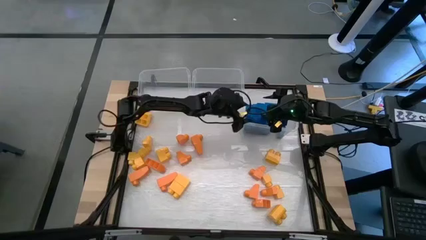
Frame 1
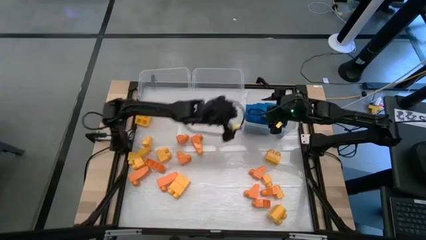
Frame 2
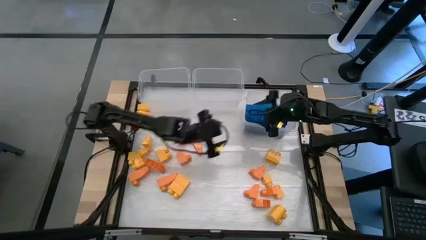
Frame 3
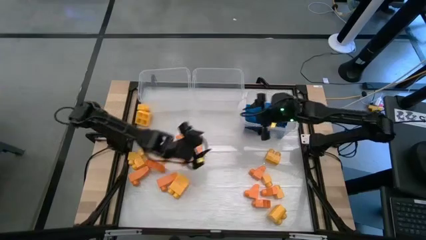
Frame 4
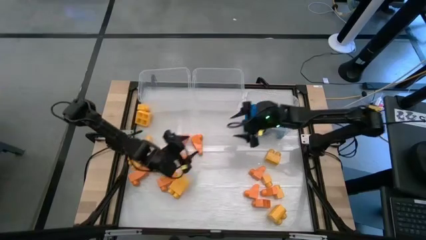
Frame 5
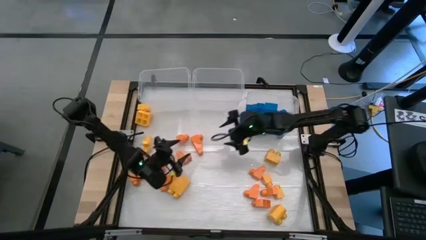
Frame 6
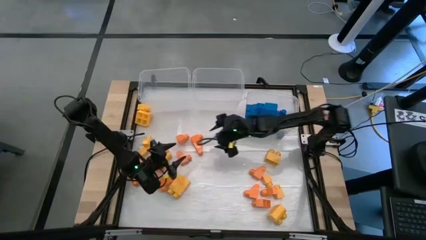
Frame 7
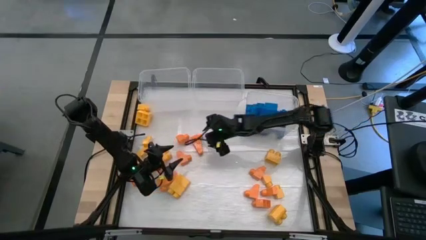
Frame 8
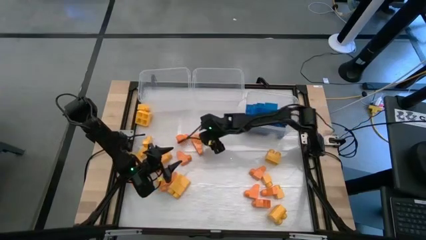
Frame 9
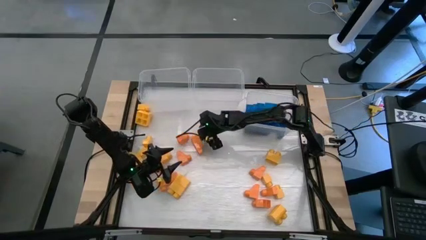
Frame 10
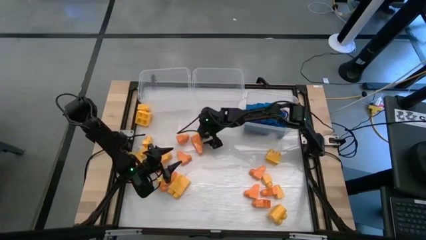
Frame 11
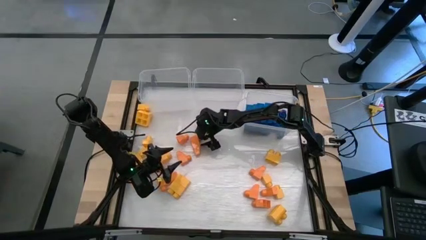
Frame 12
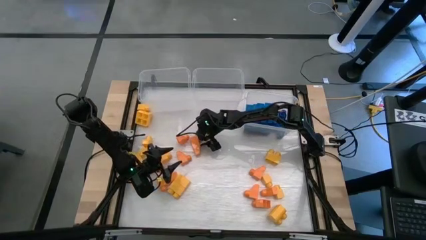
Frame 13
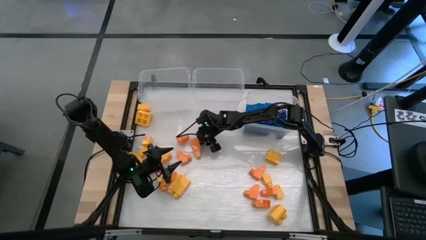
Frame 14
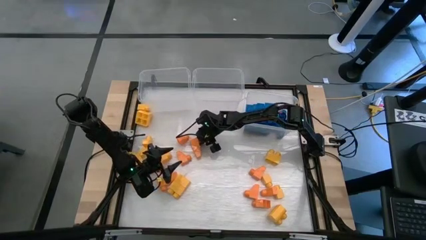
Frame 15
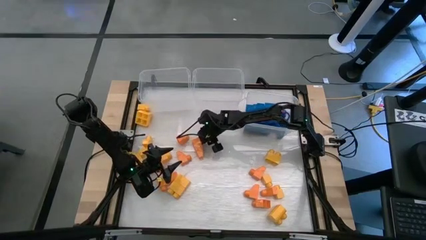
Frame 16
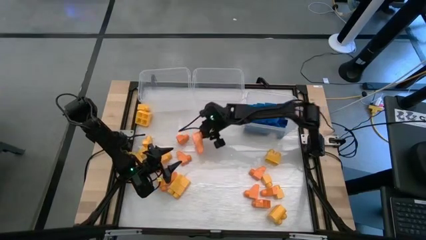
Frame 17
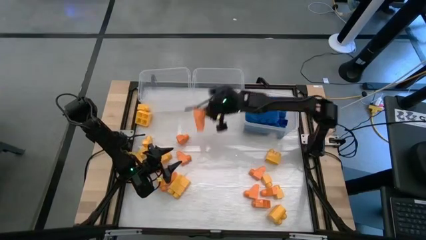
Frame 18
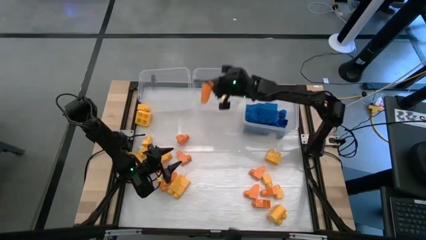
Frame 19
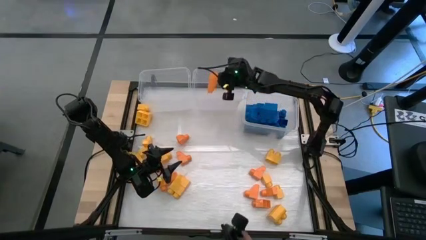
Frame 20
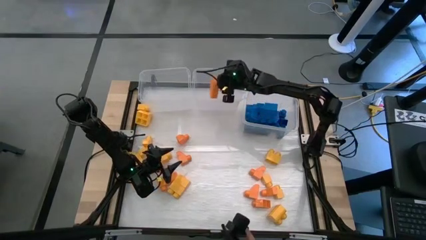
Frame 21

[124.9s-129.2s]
Task: Sort blocks
Put the orange game piece into the middle transparent bin

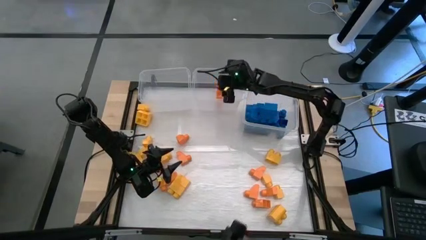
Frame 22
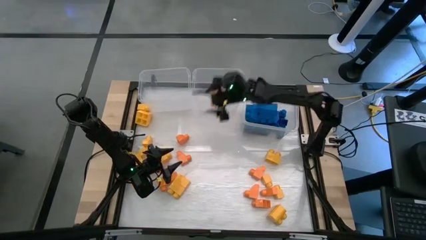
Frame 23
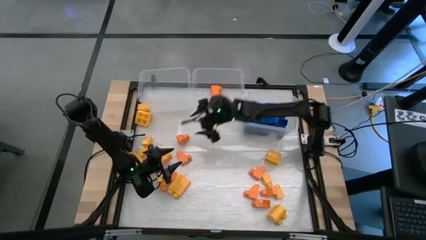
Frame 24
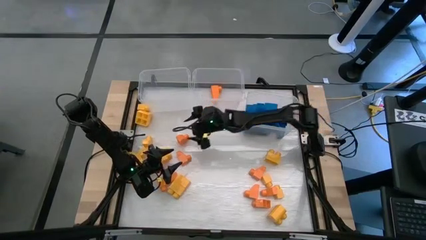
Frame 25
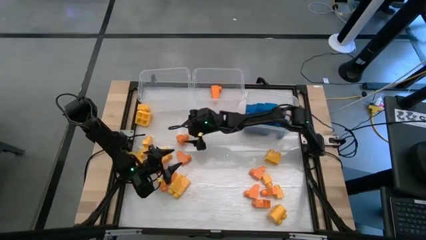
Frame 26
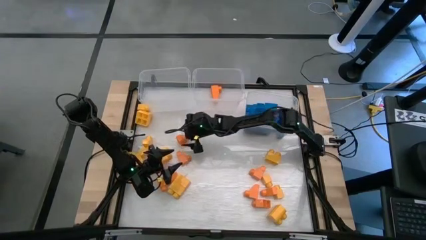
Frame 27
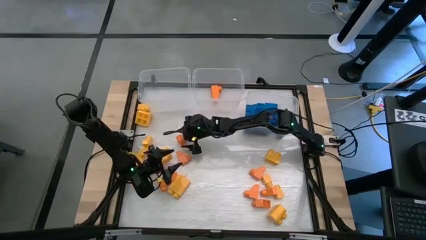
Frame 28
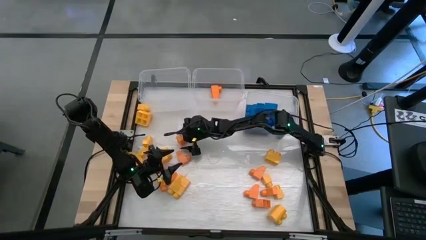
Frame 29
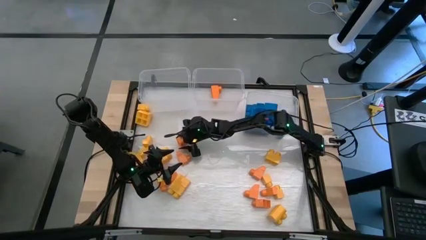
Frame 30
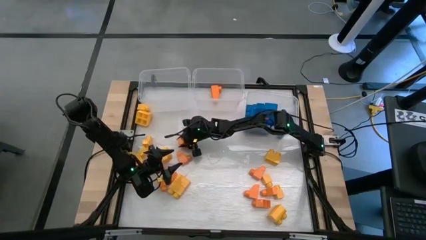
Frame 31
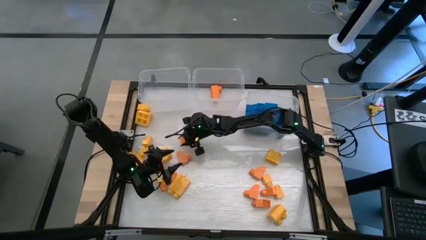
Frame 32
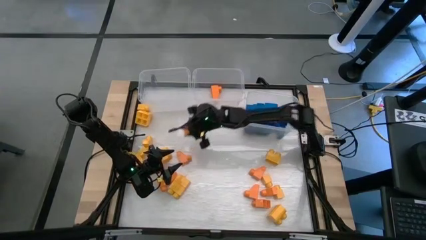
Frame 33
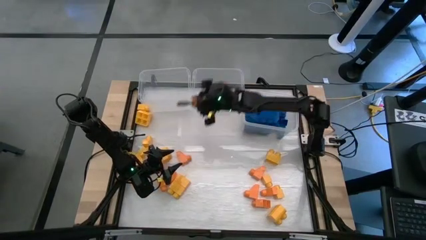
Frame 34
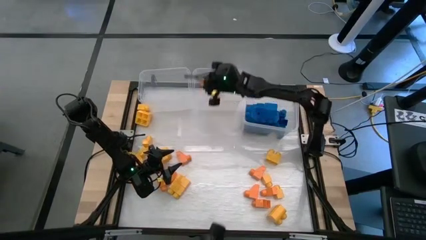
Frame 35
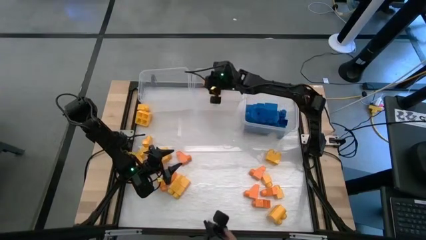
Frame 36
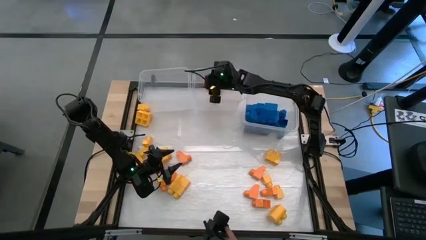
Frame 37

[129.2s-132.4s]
Put the orange game piece into the middle transparent bin

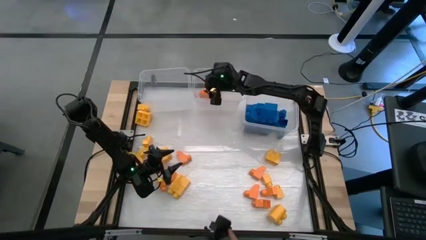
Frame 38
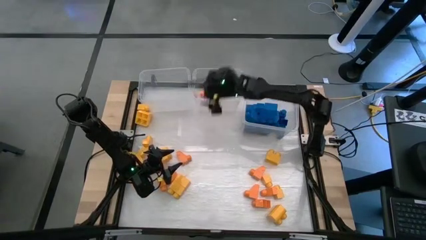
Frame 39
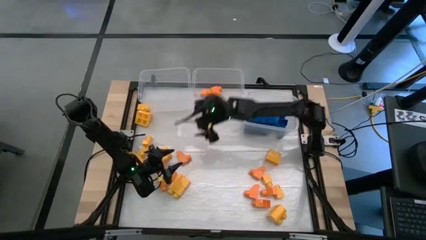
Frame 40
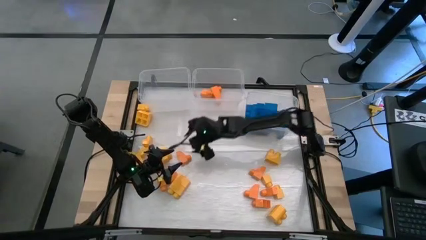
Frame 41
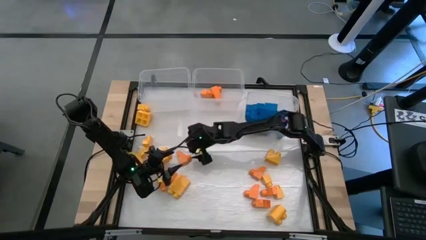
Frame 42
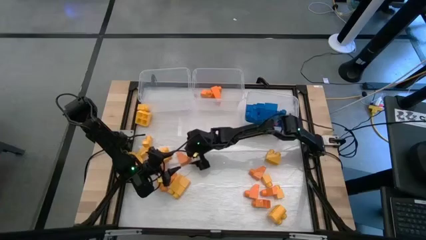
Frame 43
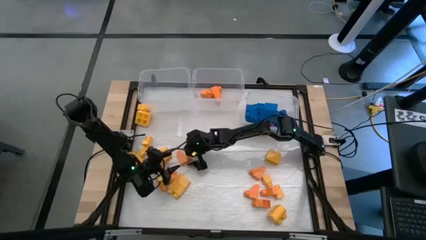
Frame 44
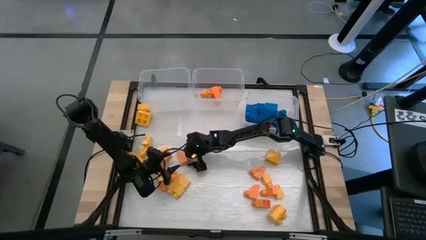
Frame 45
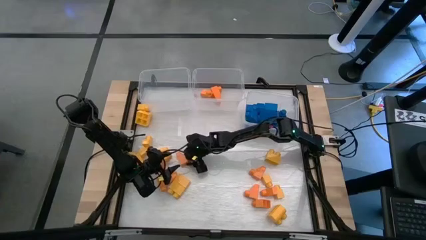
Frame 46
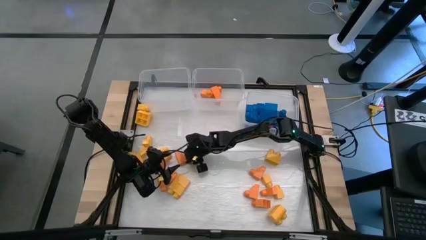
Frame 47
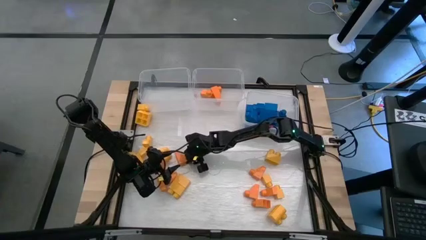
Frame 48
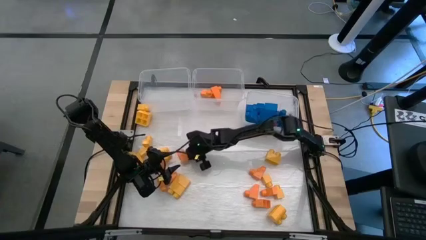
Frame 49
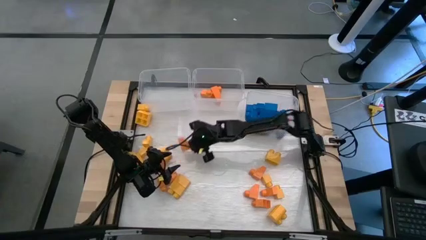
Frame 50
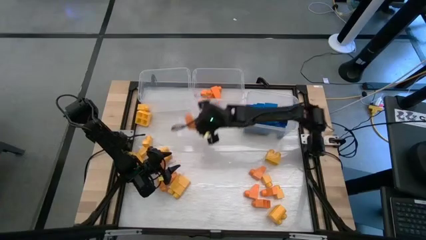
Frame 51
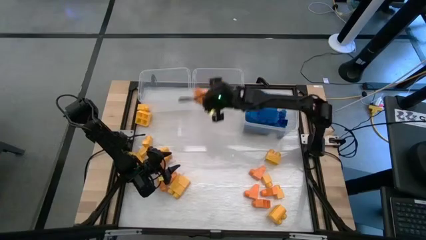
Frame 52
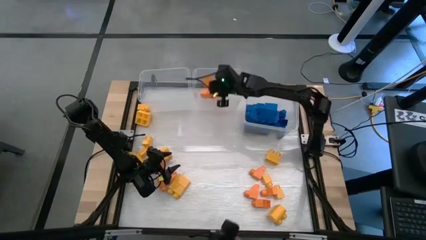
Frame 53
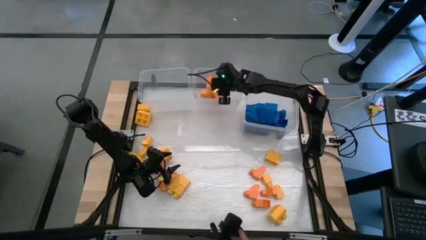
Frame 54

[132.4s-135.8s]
Put the orange game piece into the middle transparent bin

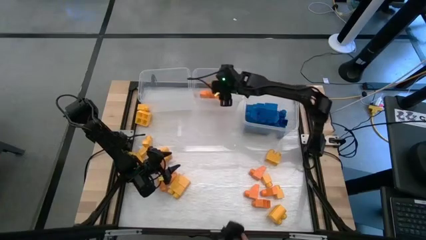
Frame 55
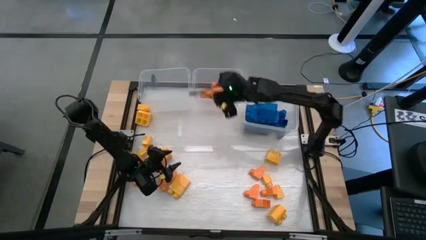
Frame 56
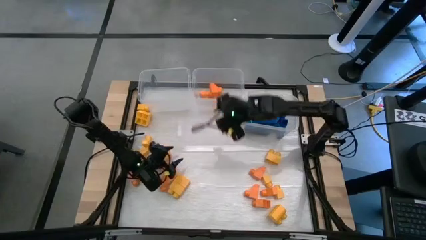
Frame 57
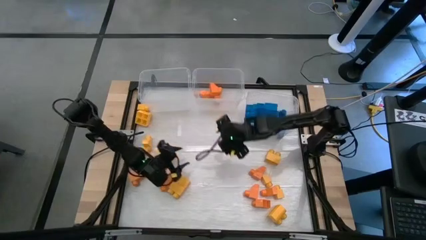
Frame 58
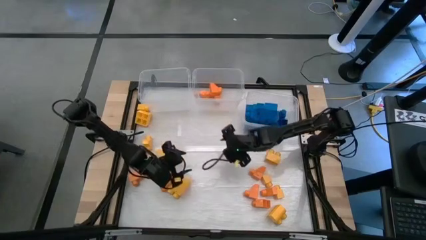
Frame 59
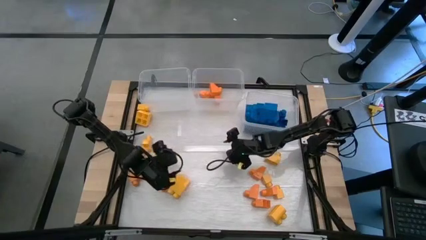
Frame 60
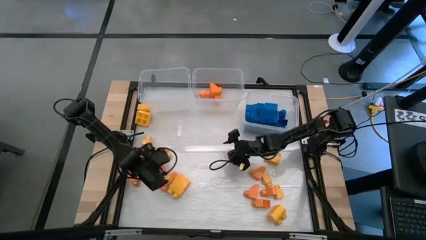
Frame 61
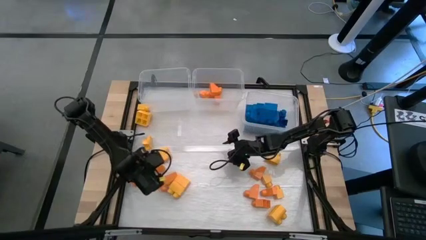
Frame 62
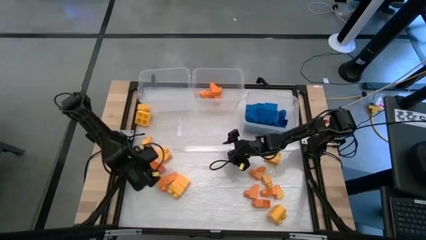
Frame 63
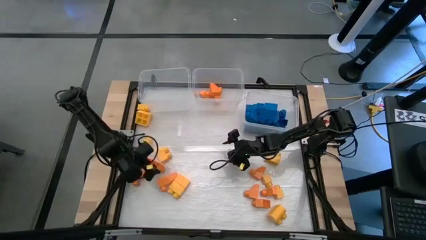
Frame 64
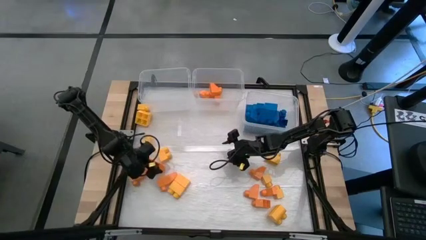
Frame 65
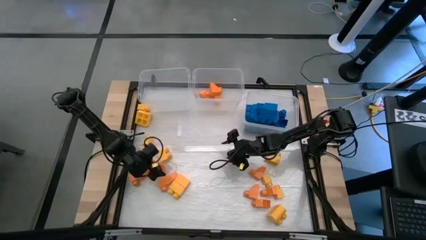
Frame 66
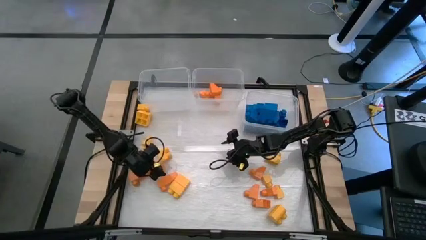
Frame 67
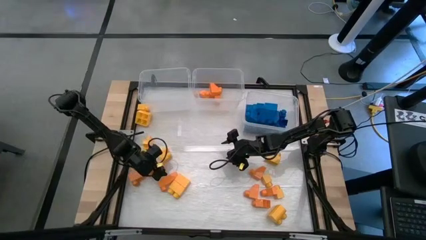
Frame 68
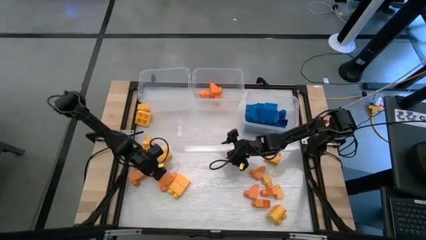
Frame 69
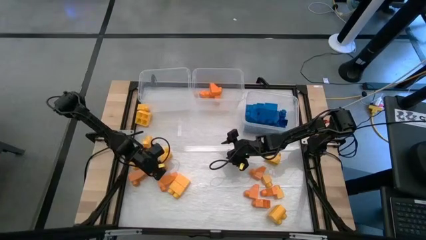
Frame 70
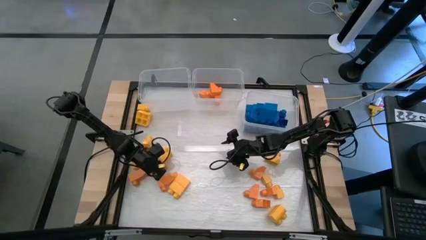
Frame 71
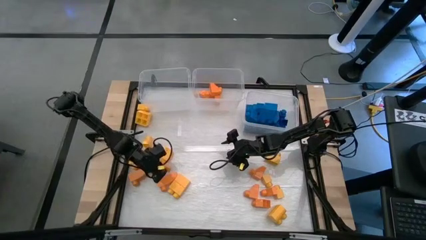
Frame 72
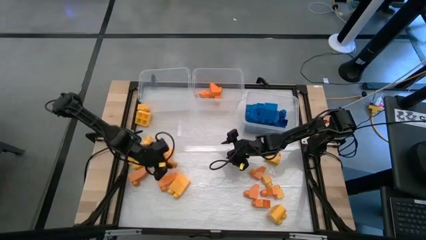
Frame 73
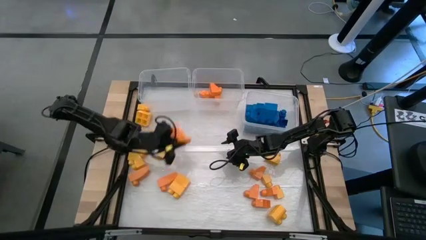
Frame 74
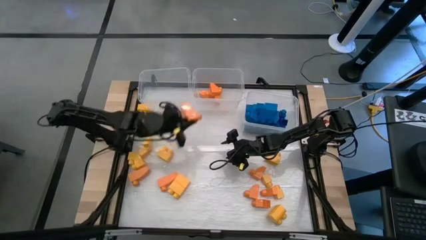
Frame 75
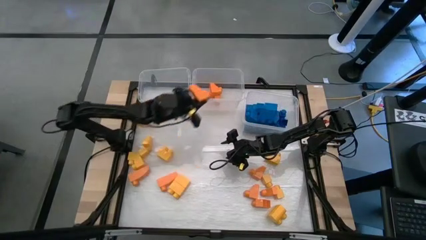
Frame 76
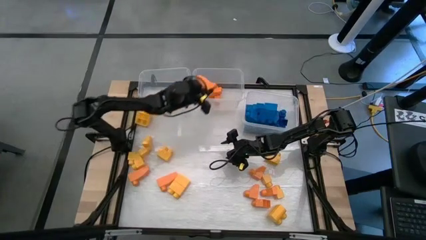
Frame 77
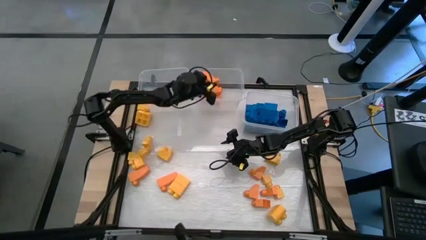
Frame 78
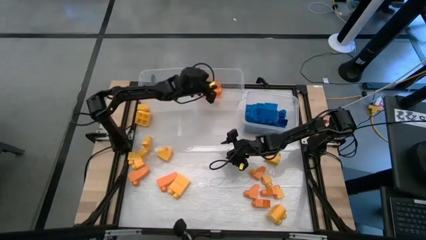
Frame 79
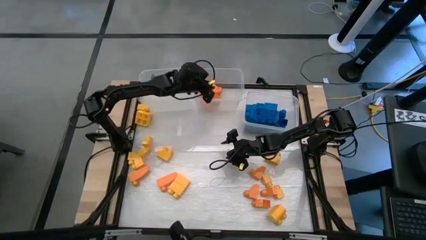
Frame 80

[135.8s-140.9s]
Put the orange game piece into the middle transparent bin

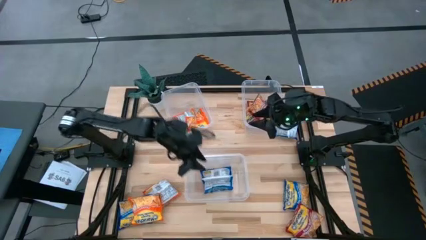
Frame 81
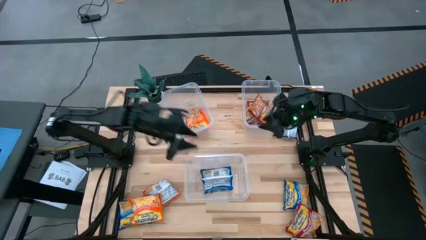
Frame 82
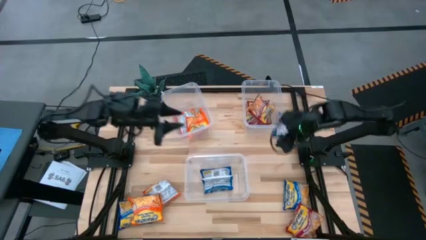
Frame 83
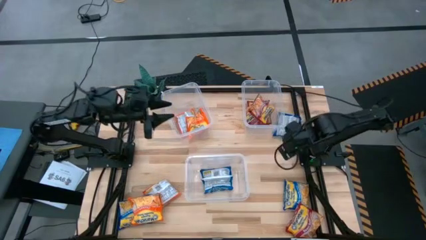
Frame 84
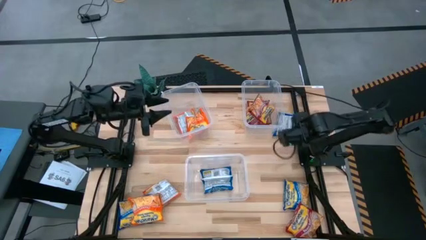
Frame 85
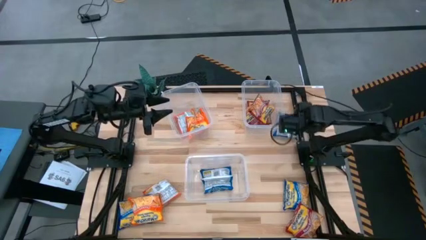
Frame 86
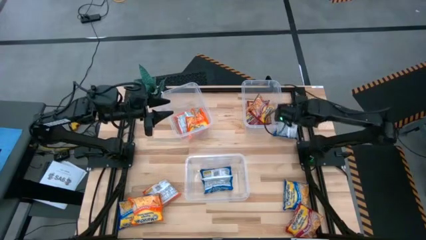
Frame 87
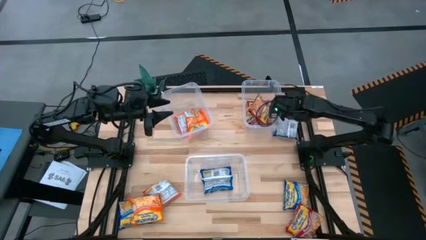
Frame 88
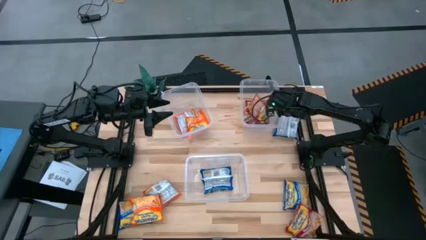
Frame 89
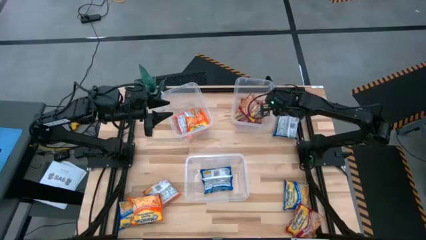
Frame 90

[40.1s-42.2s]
Task: Sort Maruchan noodles
Adjust the top right transparent bin on the table
